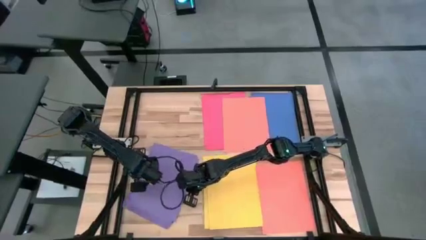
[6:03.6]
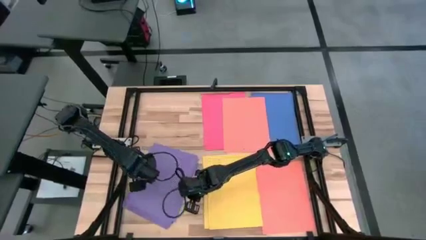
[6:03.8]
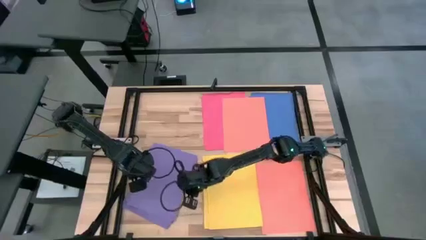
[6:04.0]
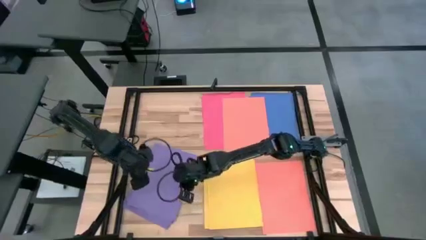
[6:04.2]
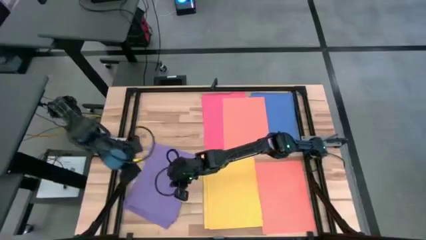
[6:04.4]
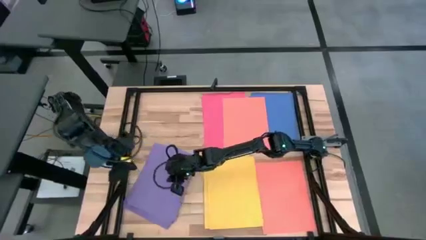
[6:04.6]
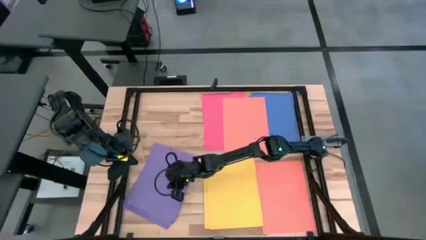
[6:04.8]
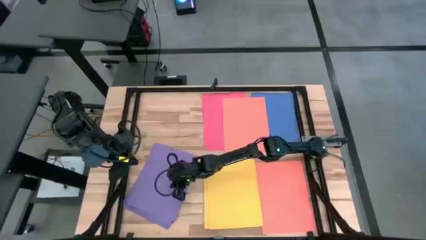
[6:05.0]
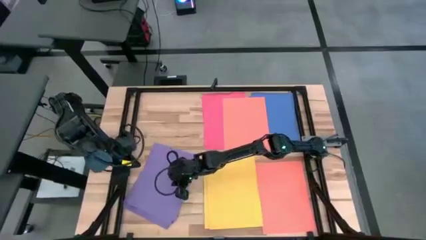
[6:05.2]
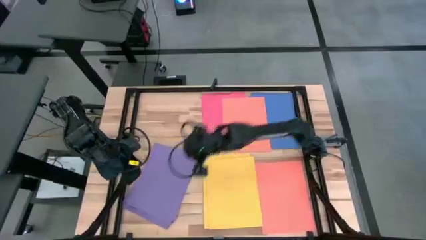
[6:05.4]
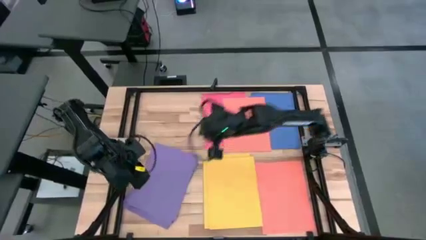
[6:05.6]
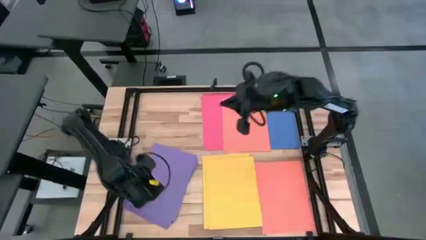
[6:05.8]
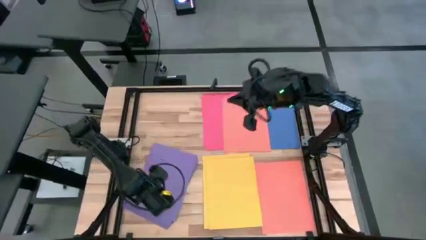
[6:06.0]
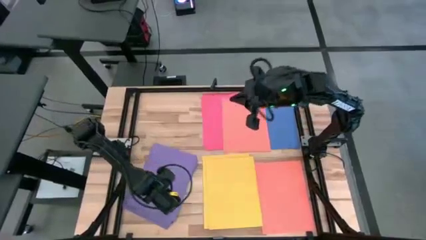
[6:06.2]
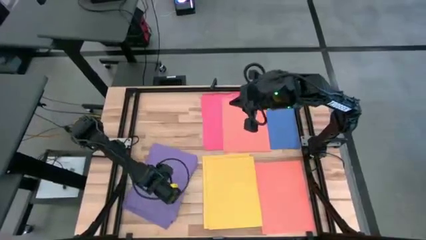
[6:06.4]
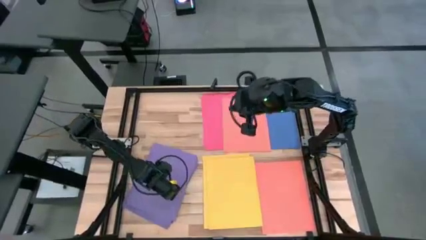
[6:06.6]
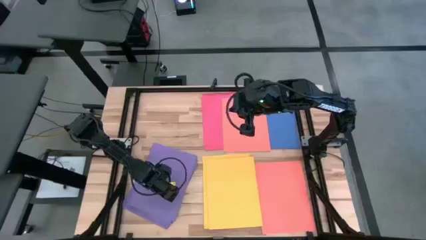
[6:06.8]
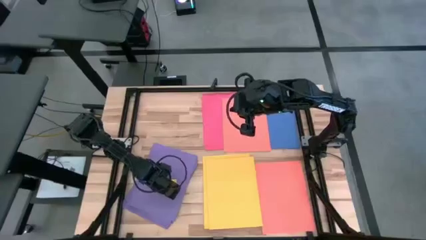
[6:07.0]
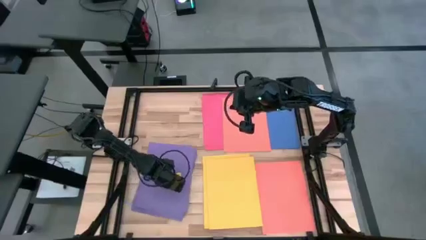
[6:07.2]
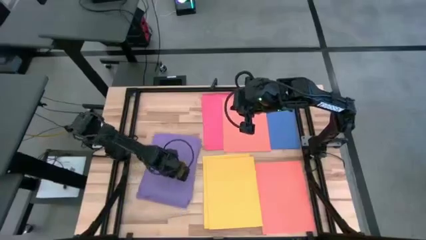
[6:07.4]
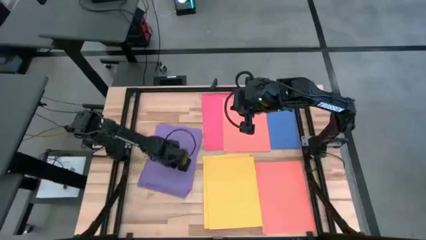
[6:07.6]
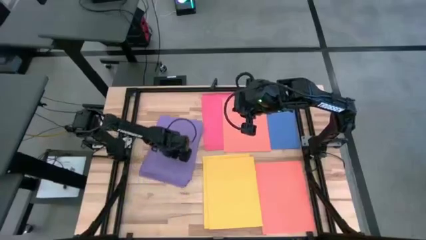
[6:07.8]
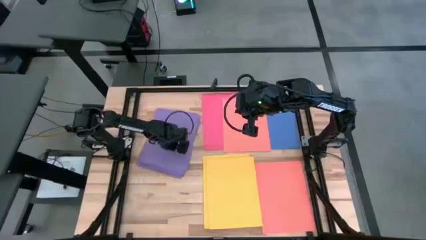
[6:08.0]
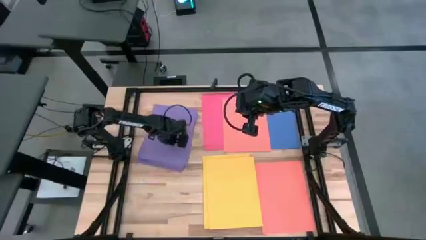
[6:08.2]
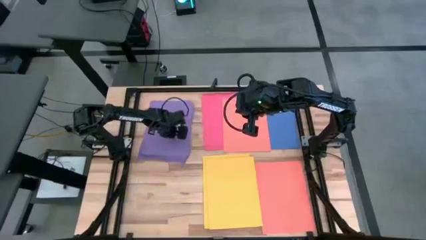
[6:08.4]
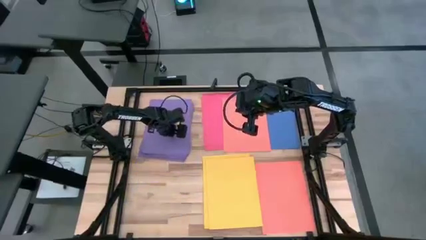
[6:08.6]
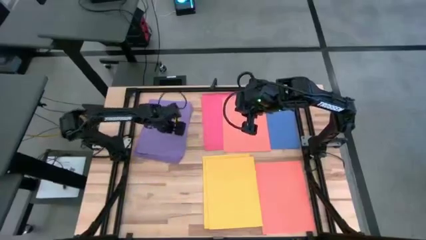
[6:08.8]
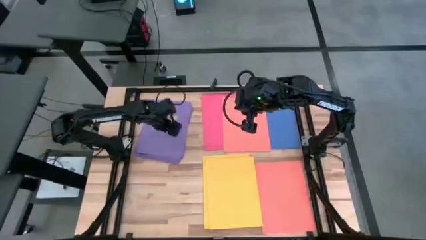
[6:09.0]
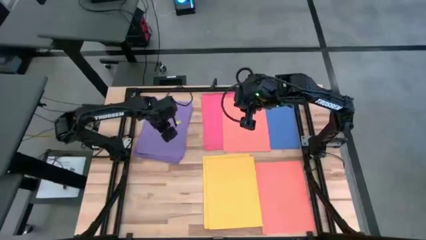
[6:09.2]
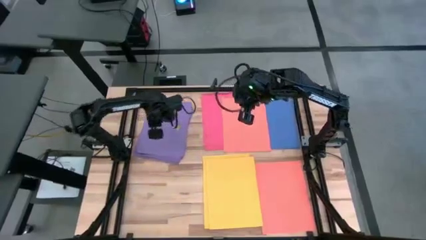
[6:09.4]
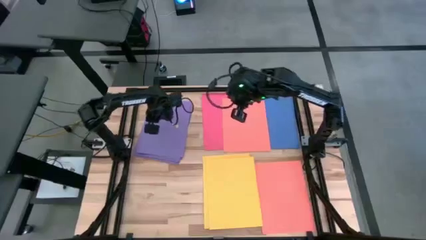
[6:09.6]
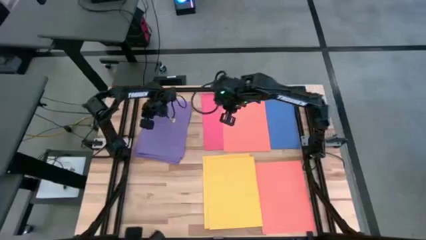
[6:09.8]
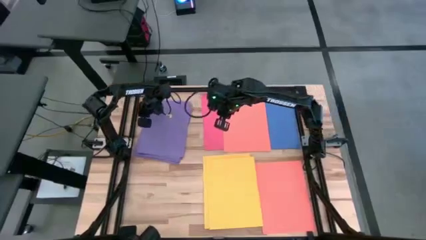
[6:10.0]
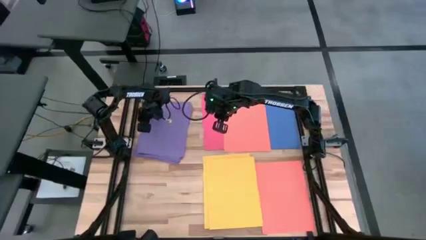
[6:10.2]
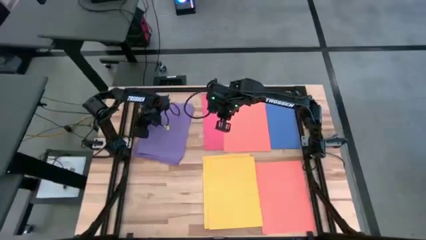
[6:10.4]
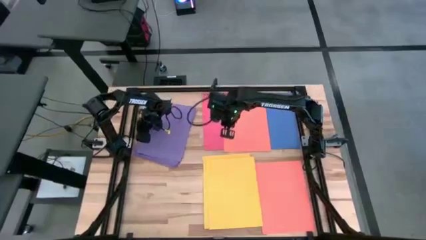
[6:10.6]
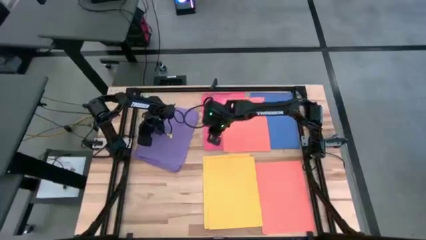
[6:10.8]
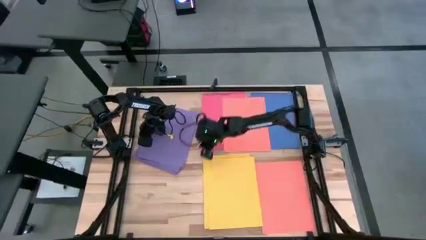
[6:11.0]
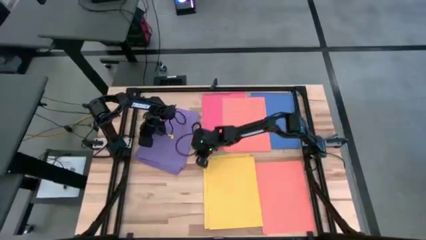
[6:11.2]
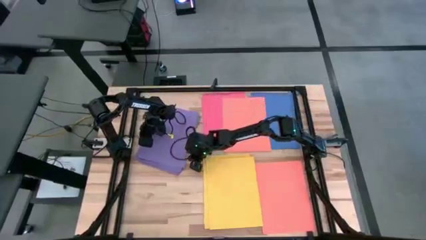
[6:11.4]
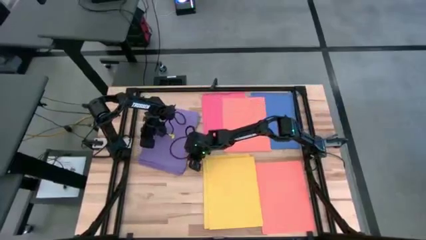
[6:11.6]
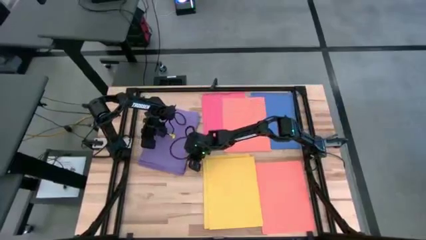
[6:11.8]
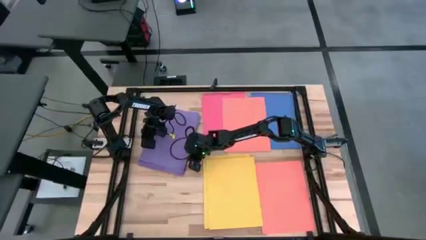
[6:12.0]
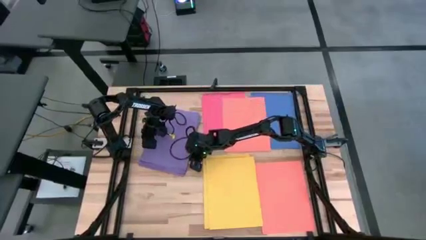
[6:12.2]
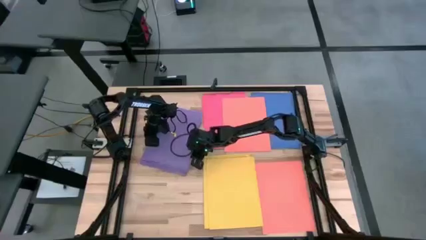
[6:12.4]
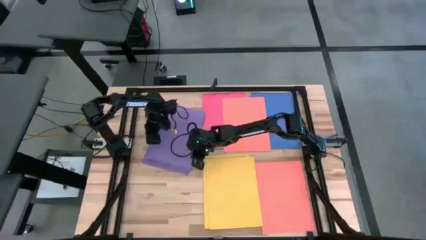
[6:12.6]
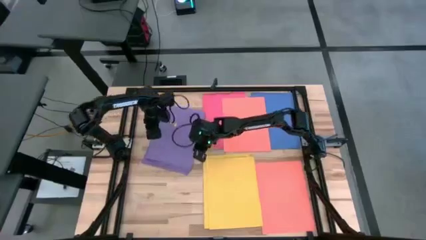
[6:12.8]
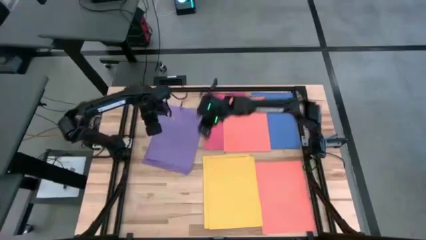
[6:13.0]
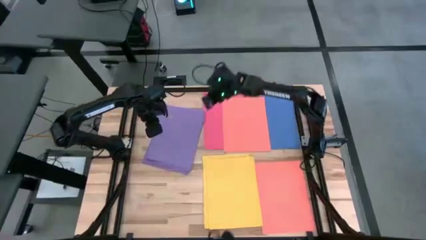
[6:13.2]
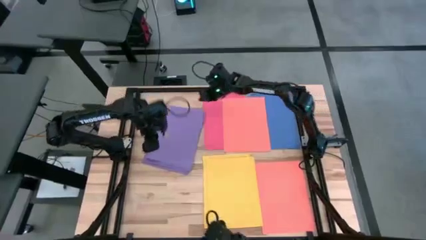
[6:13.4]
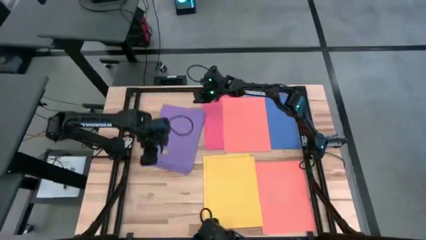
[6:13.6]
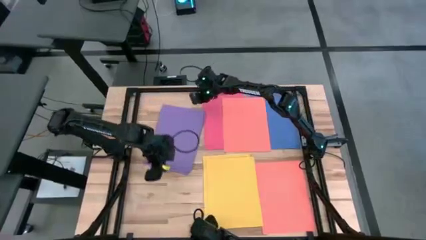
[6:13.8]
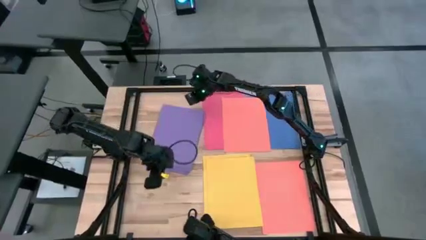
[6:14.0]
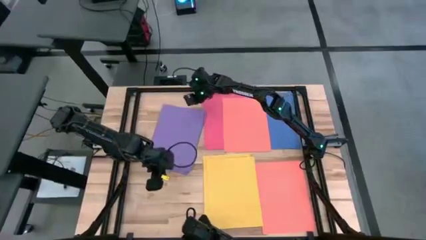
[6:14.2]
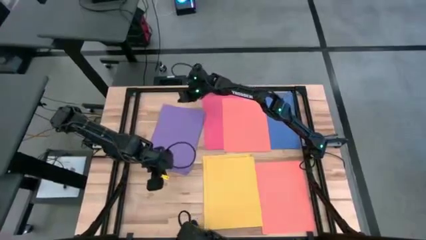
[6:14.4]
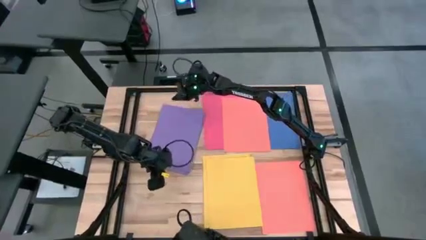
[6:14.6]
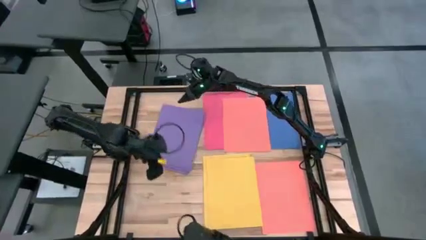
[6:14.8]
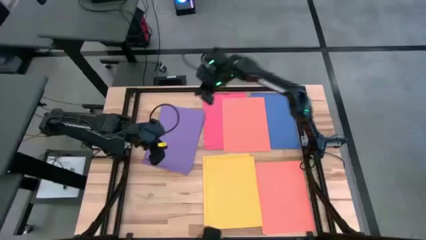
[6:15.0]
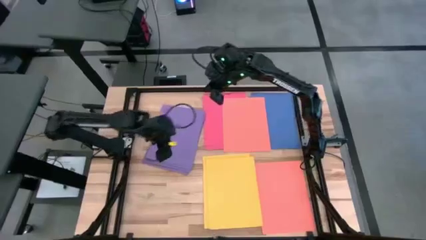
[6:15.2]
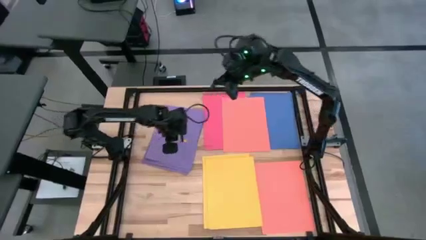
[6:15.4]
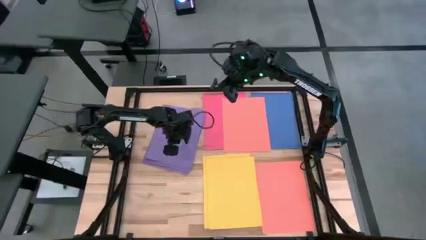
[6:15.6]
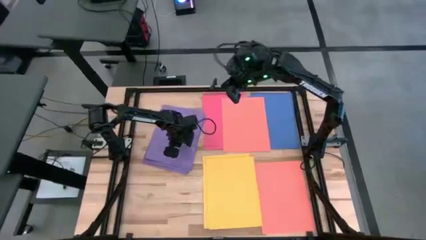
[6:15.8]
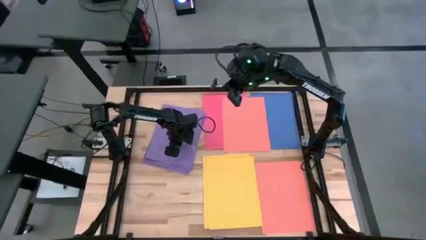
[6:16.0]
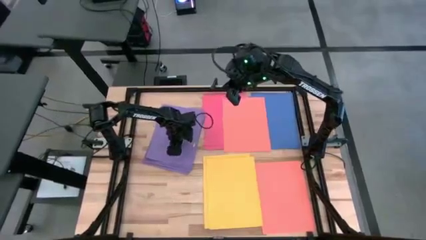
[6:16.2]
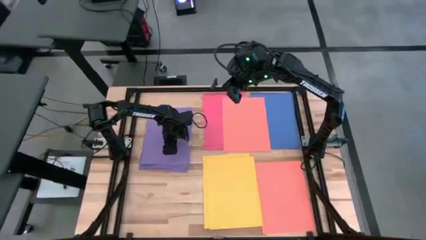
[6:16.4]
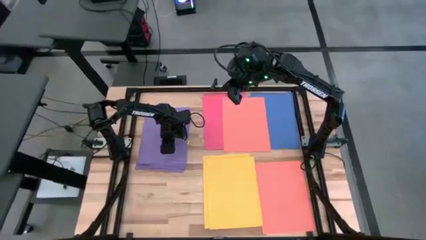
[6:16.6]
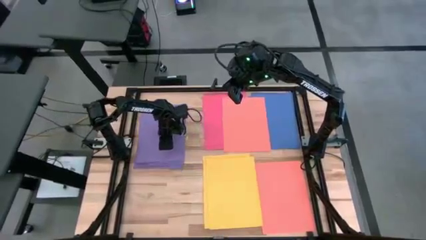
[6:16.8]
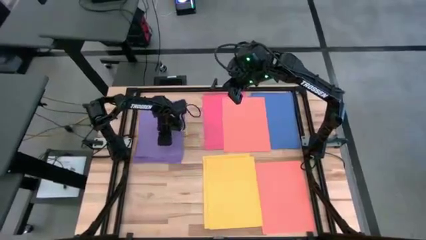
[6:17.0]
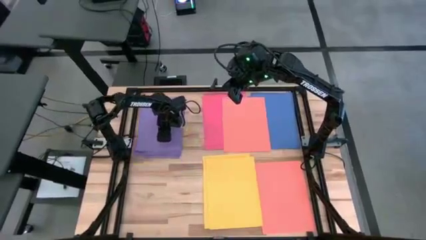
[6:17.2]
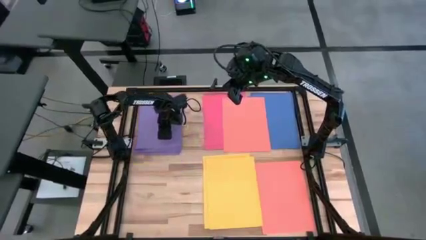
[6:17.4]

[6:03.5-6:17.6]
Task: Organize paper
Move the purple papers to the top left of the table
